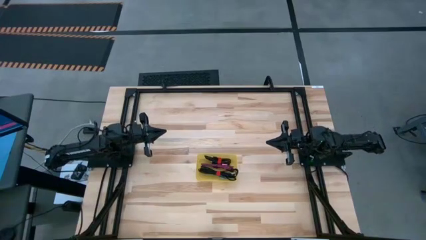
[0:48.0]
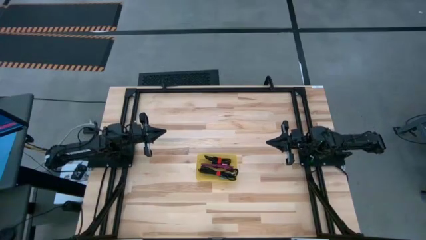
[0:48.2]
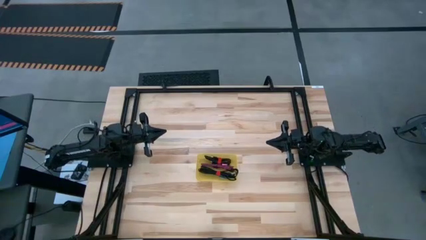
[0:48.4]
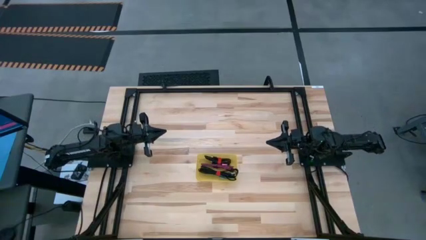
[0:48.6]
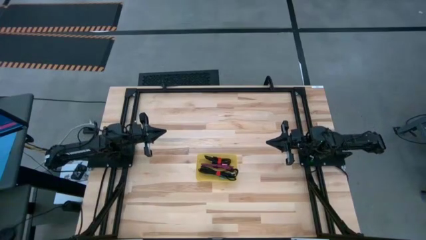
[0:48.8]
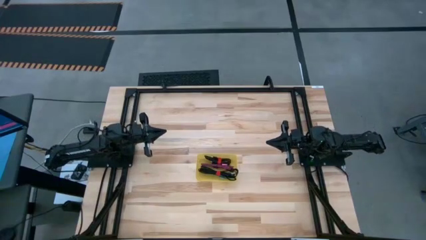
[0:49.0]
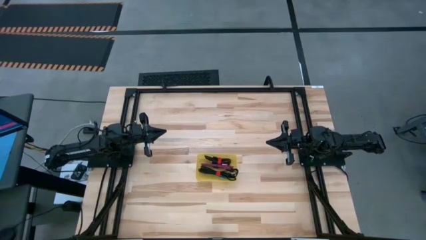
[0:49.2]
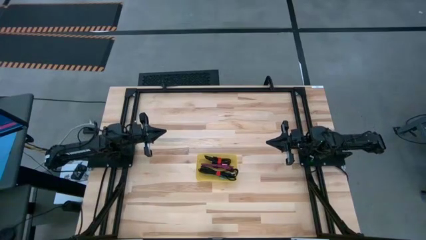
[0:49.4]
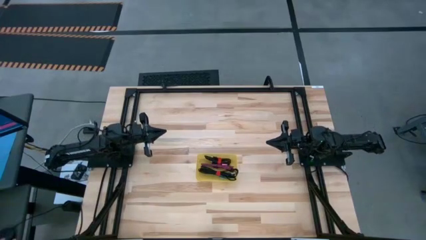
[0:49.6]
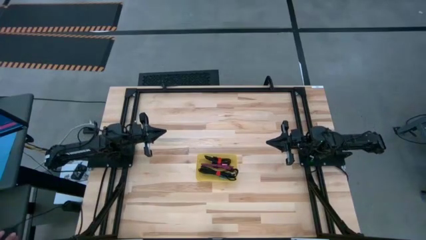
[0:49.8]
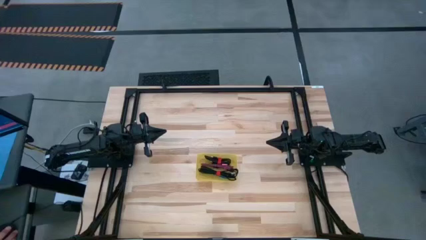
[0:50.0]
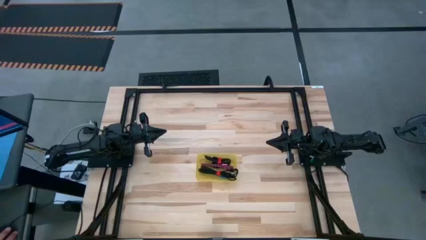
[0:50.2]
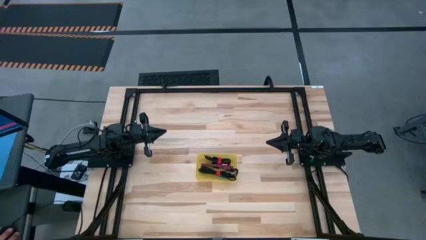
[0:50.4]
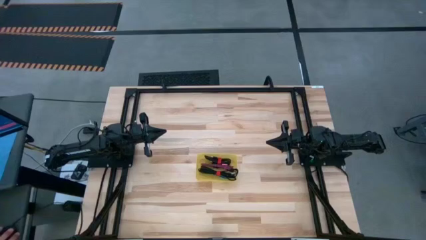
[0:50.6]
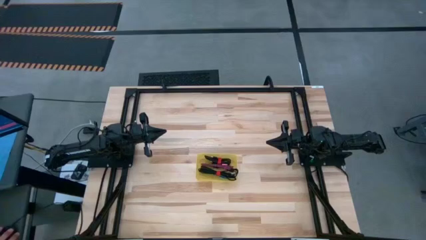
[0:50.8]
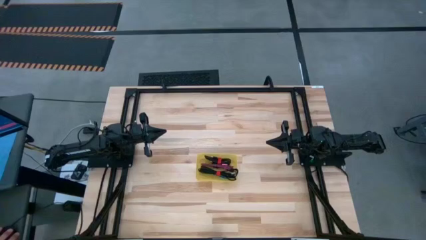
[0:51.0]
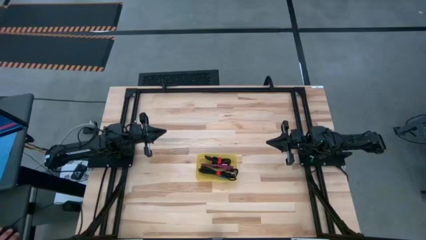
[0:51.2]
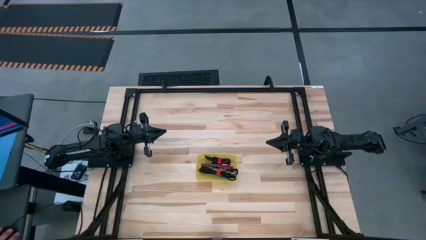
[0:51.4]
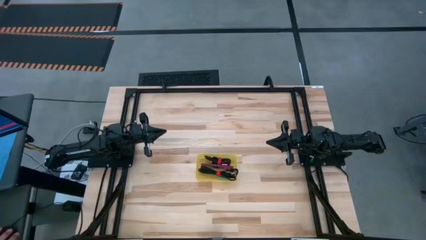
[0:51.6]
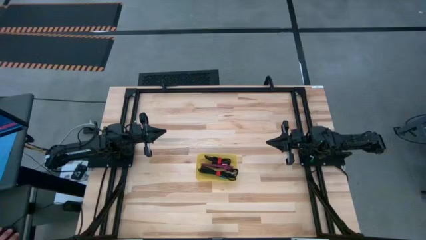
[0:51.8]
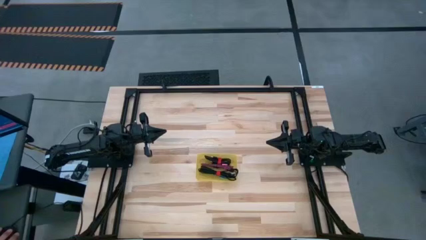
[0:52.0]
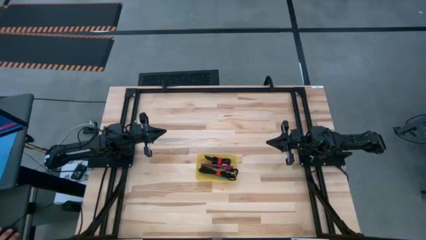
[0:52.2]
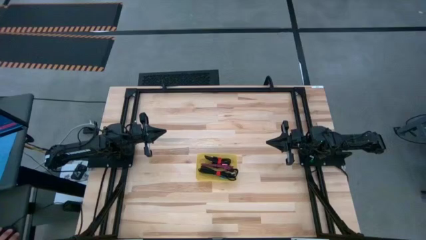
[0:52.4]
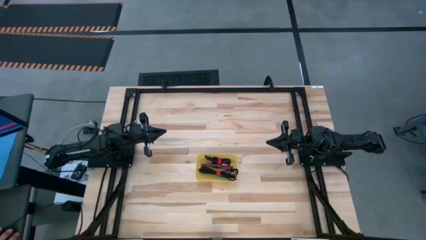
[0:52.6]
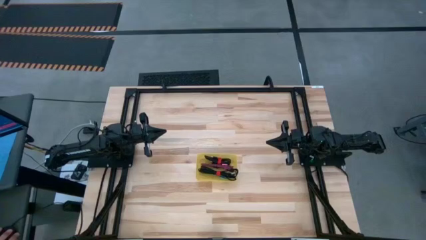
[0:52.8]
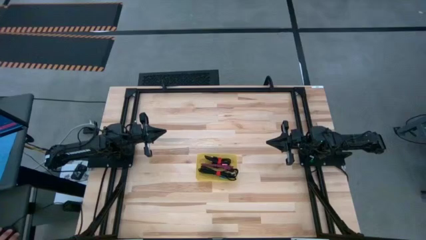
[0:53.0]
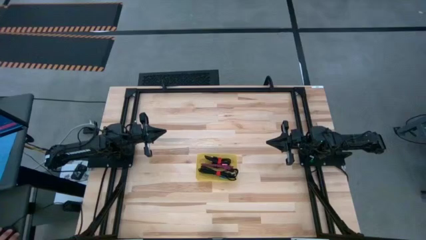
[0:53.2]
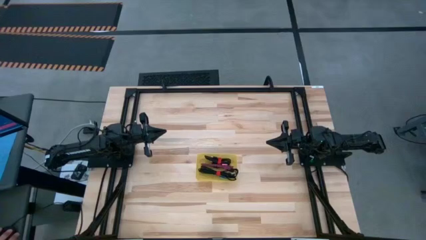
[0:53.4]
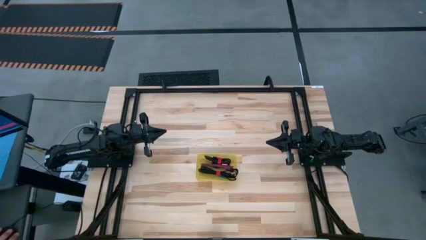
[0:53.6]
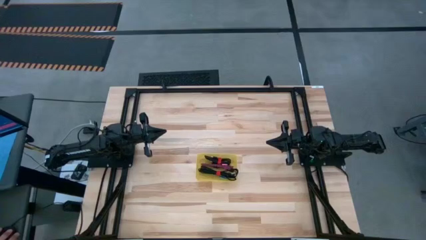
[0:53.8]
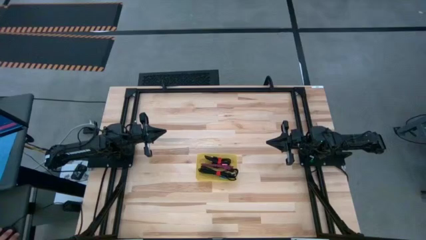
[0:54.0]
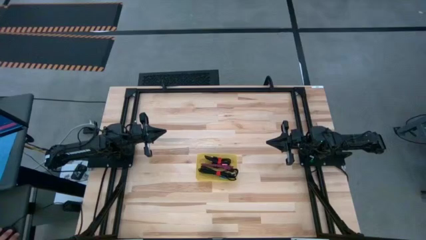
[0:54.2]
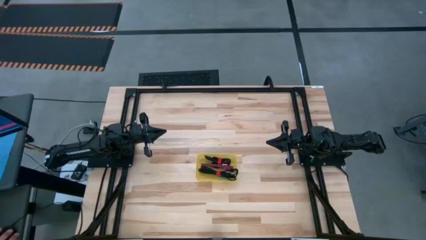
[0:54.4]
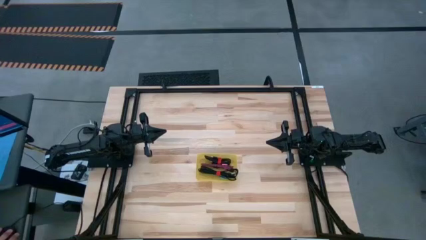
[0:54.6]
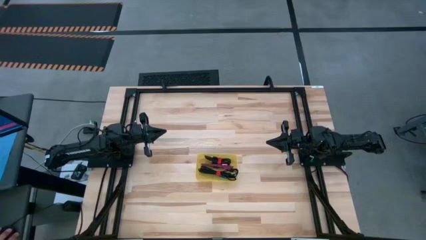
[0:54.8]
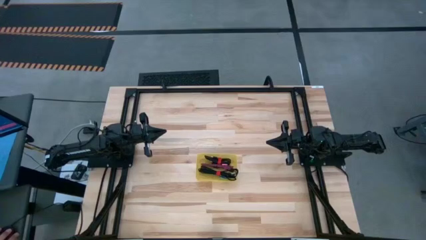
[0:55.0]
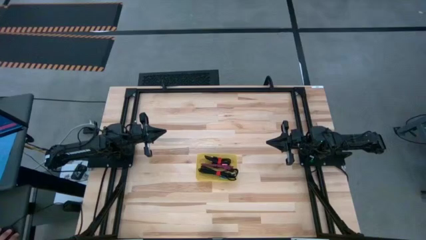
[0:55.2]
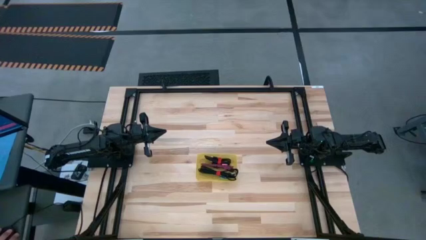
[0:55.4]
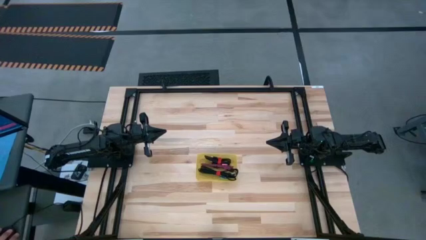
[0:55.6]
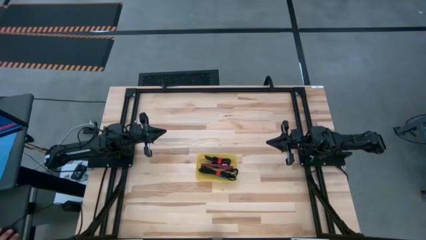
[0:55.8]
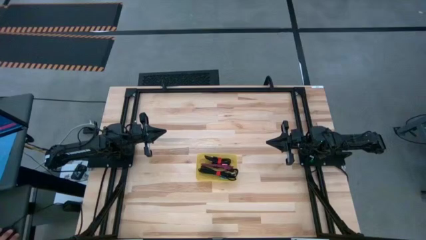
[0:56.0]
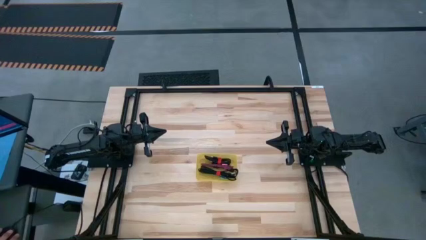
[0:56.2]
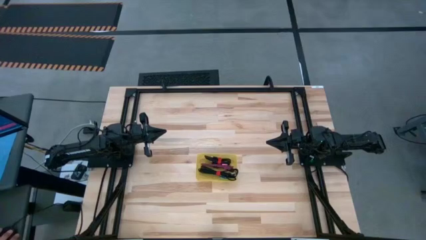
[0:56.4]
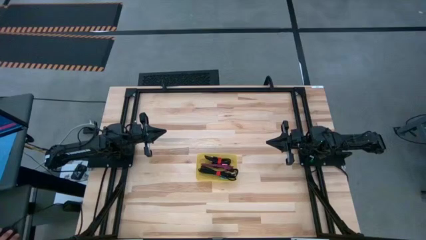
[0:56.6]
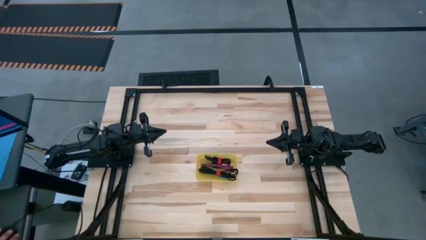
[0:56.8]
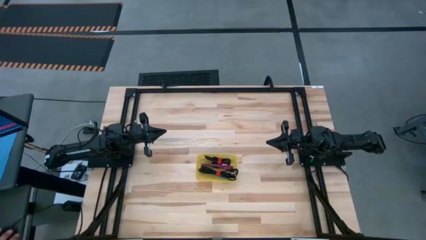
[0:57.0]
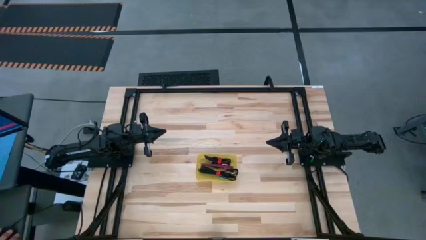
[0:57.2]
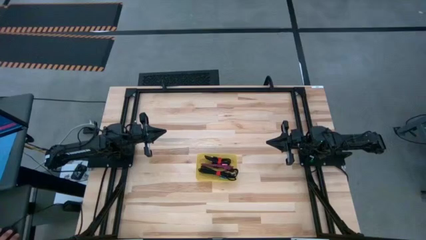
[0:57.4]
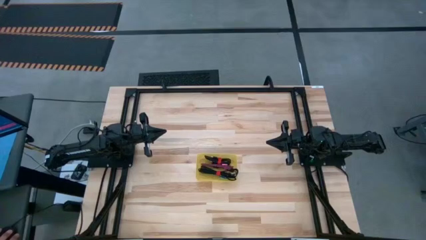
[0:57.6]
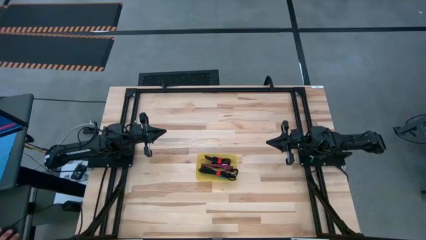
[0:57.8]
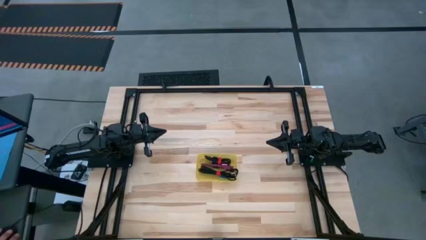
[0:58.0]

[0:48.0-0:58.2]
Task: Pick and place USB-C Cables
Return to Home Position

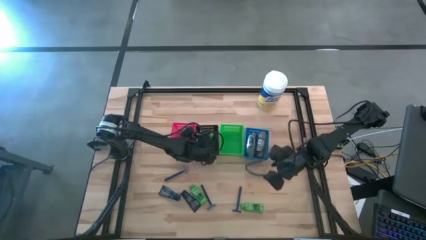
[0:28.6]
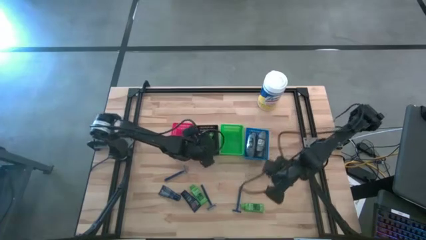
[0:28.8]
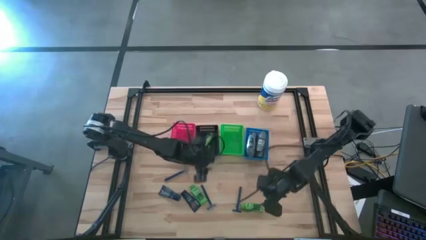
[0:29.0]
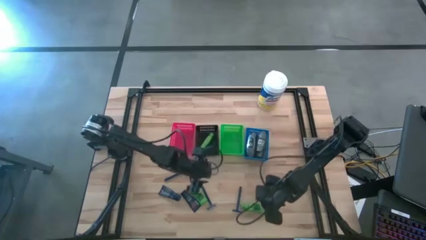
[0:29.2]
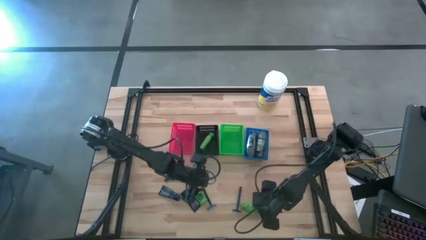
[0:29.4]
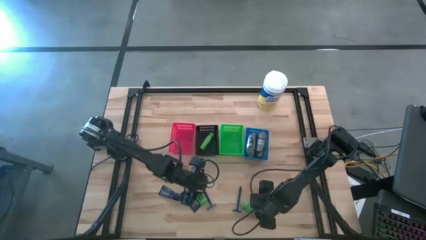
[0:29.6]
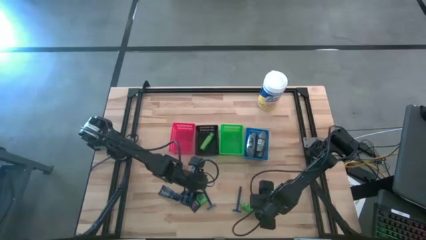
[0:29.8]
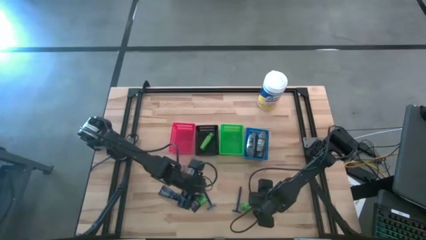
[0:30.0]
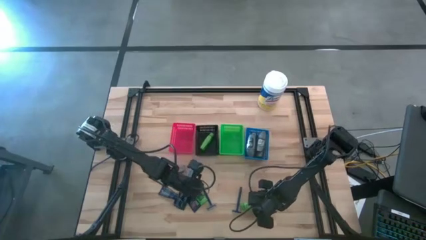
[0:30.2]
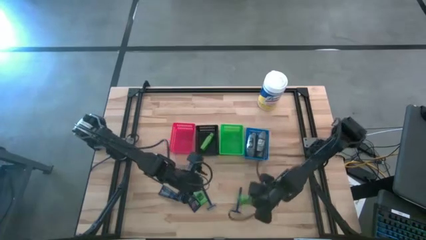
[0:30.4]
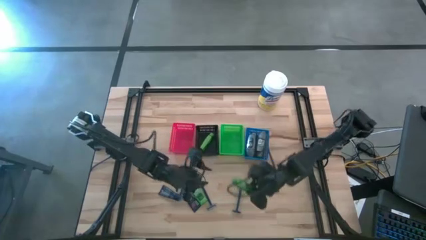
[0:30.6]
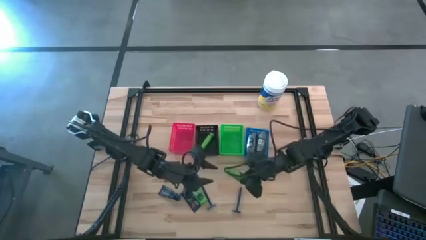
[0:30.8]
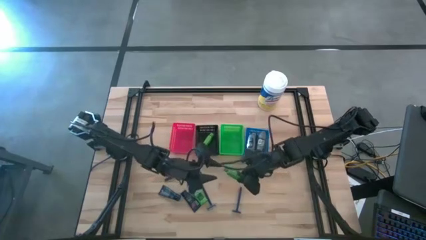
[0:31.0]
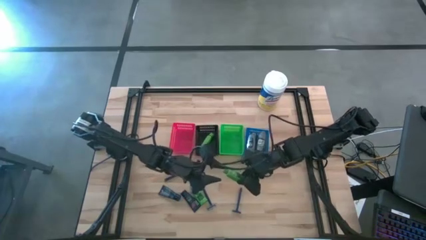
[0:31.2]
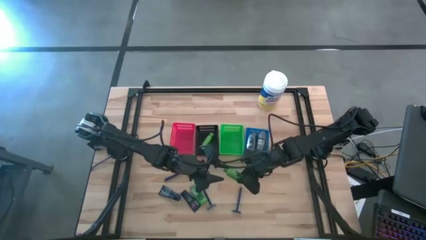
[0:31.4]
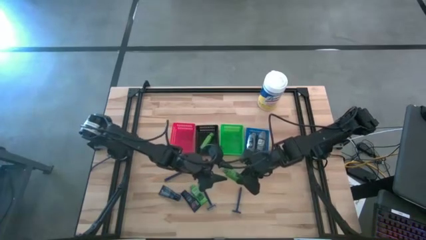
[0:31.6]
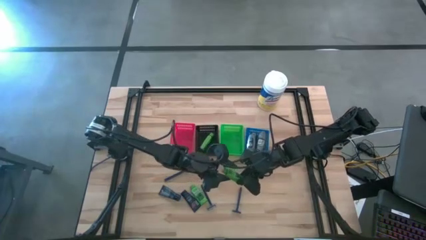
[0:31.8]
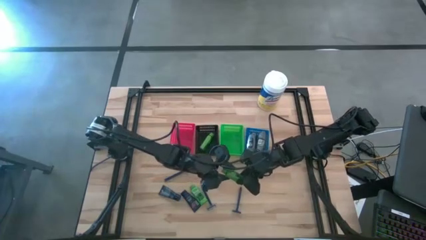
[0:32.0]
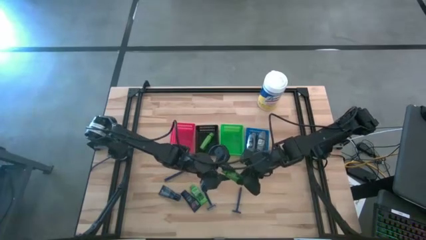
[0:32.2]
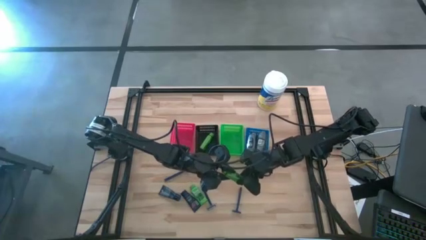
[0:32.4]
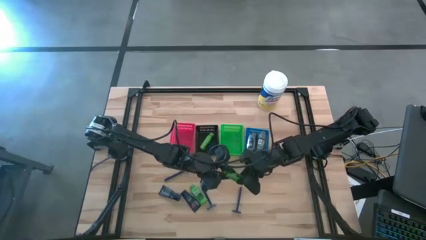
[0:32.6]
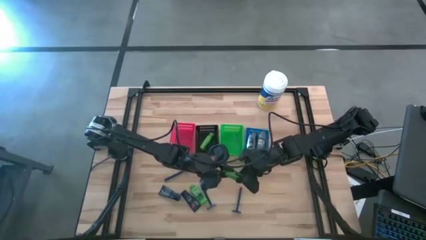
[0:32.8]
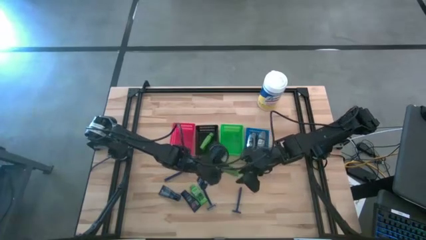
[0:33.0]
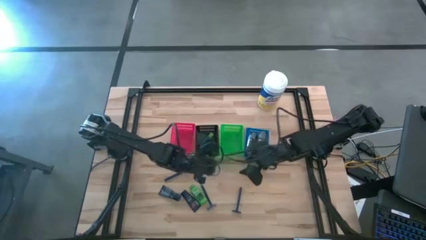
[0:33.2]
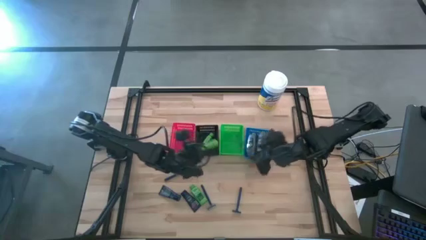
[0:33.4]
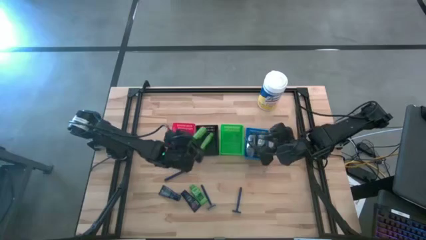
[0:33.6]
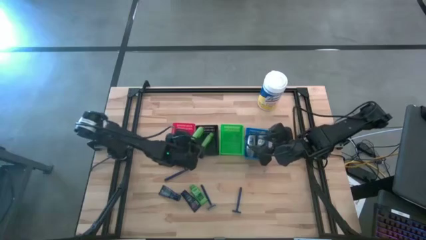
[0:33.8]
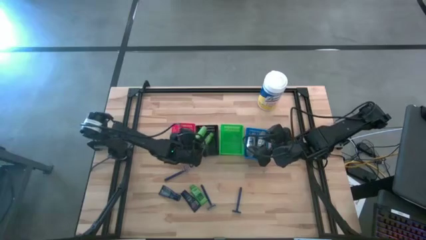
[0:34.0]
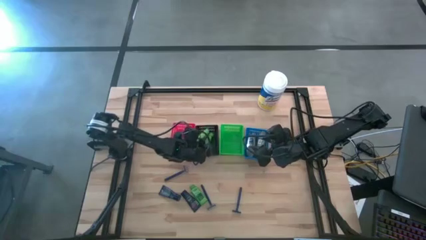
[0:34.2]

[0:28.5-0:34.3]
Task: Pick & Place Travel size toiletries
Put the green shampoo into the black bin

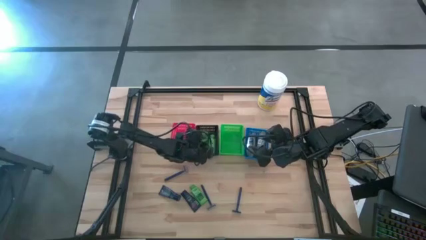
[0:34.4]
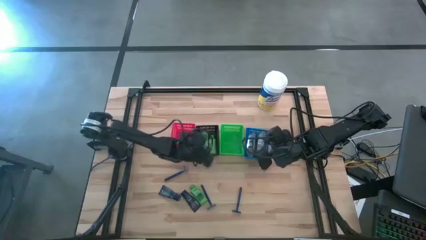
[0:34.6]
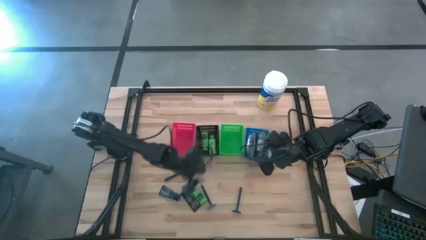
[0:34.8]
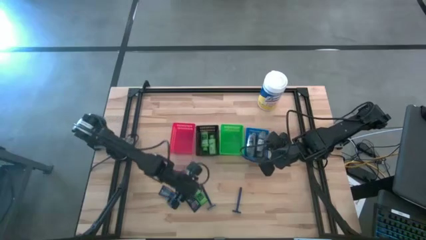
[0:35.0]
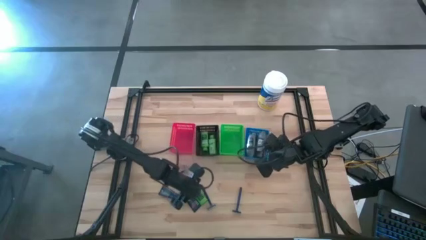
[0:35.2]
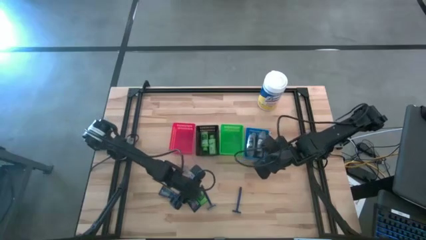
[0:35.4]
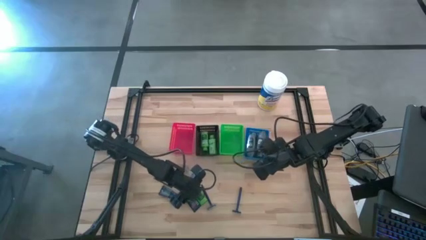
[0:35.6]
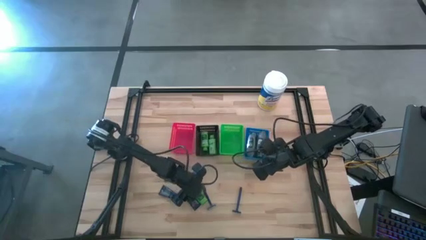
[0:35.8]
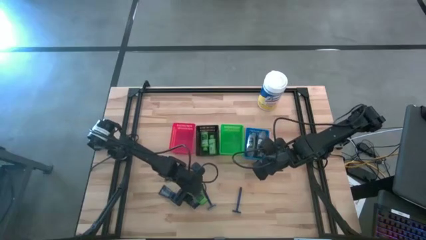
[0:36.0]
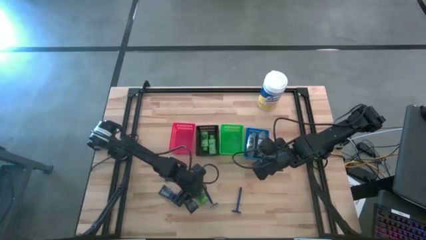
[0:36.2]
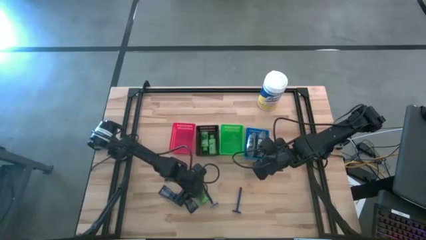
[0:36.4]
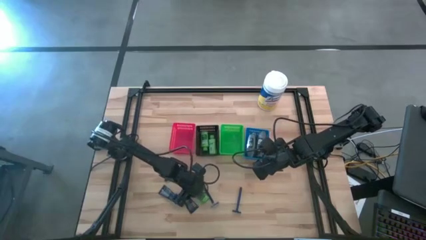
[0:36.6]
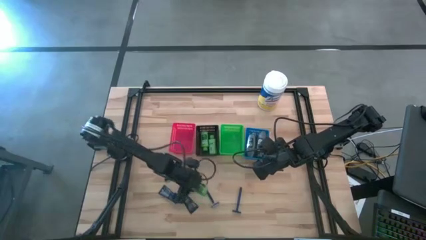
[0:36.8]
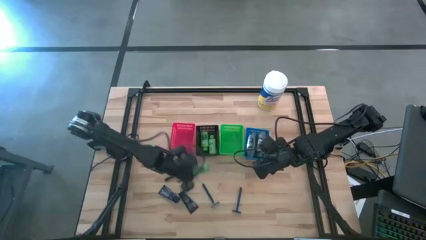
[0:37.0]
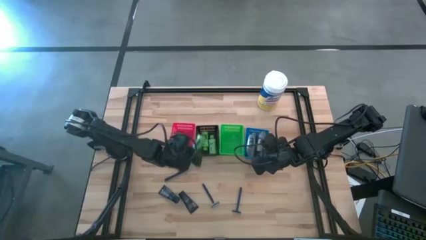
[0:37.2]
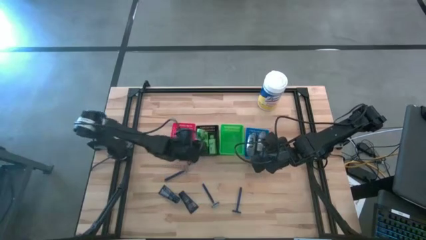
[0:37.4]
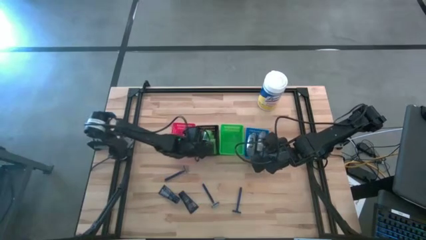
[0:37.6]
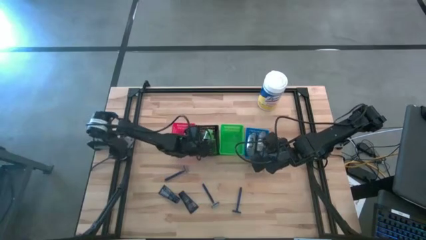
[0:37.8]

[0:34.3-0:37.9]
Put the green shampoo into the black bin
